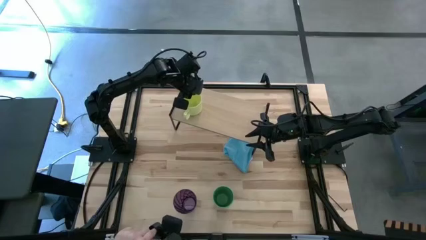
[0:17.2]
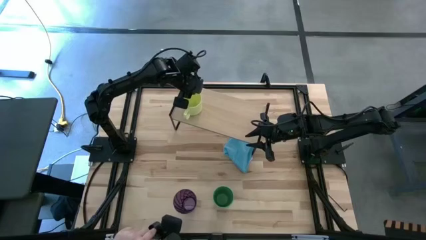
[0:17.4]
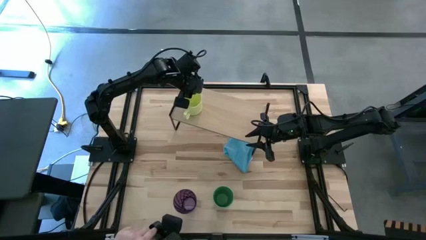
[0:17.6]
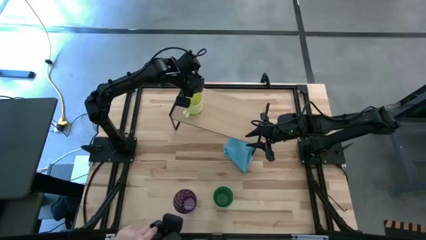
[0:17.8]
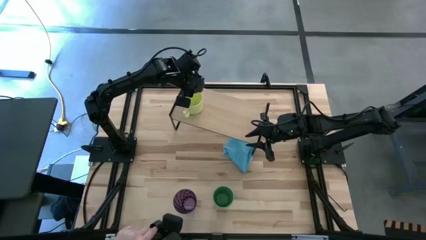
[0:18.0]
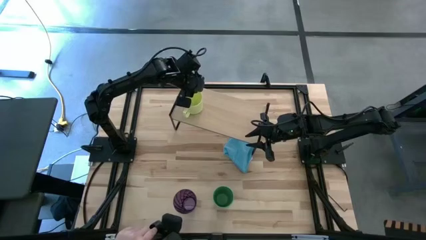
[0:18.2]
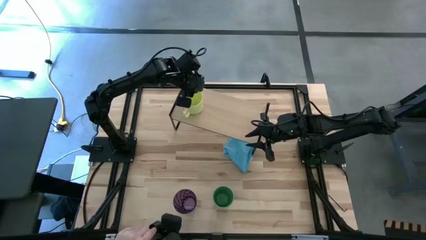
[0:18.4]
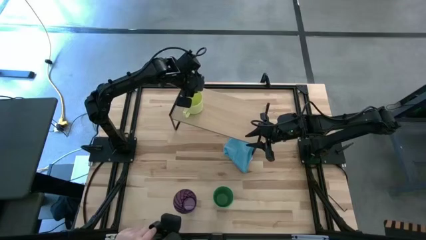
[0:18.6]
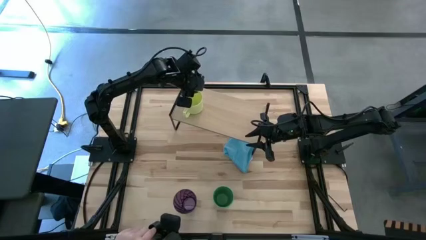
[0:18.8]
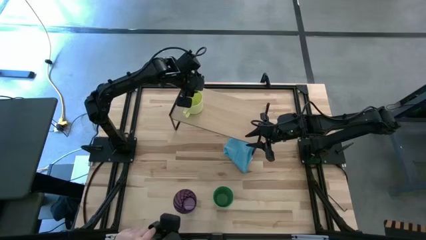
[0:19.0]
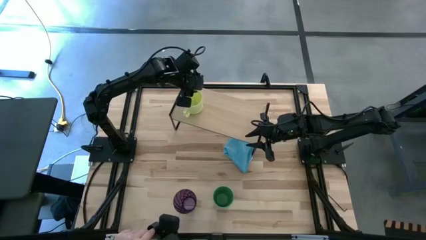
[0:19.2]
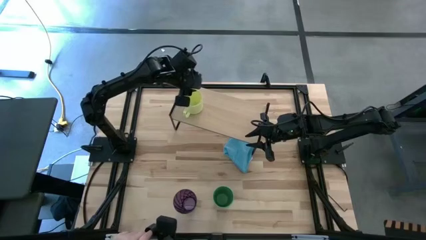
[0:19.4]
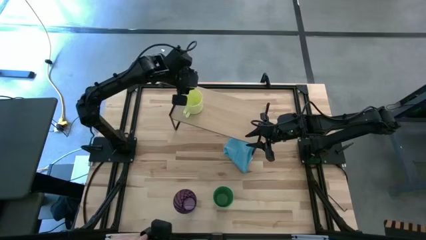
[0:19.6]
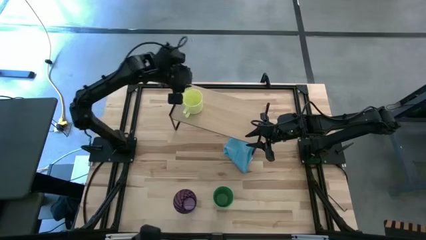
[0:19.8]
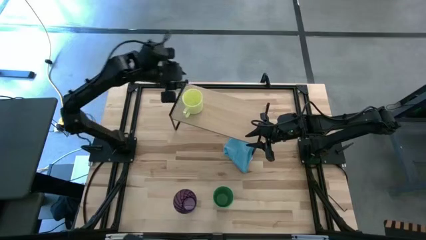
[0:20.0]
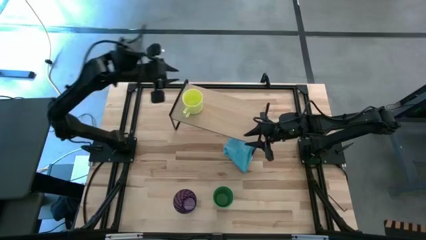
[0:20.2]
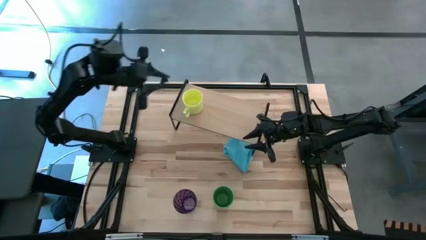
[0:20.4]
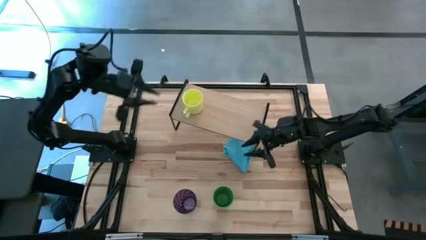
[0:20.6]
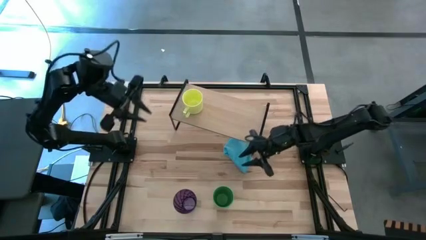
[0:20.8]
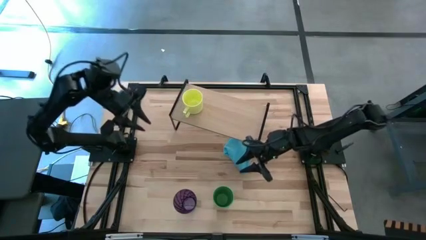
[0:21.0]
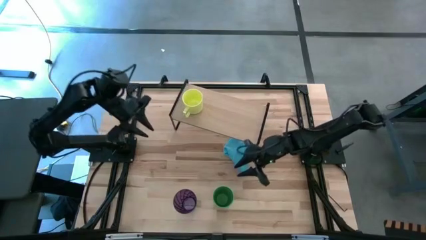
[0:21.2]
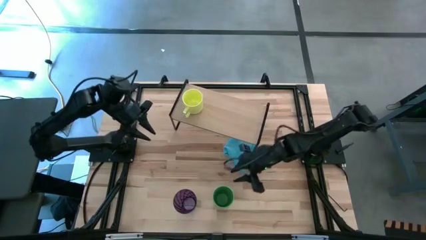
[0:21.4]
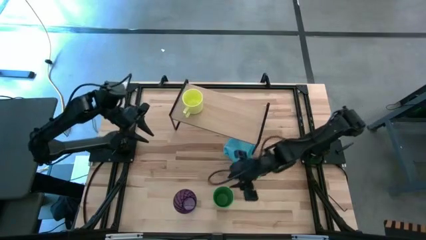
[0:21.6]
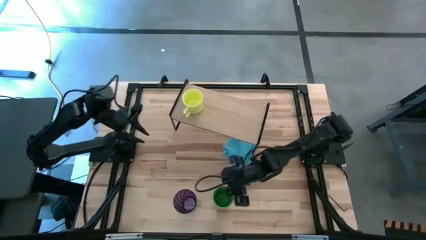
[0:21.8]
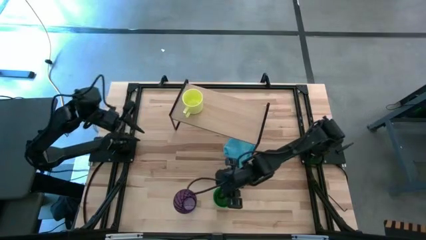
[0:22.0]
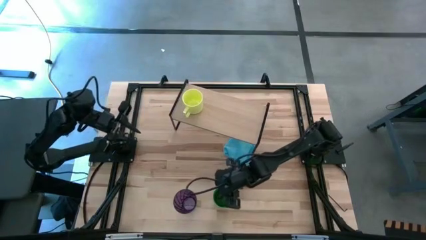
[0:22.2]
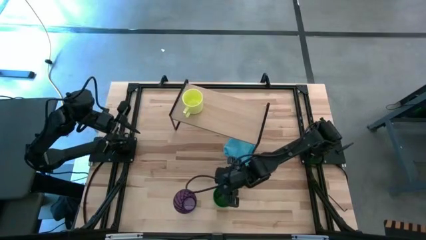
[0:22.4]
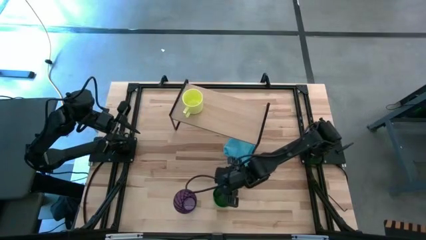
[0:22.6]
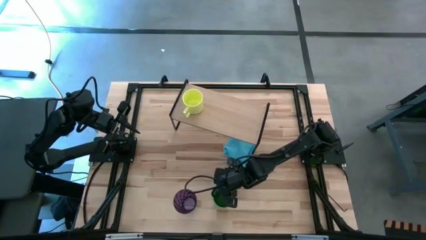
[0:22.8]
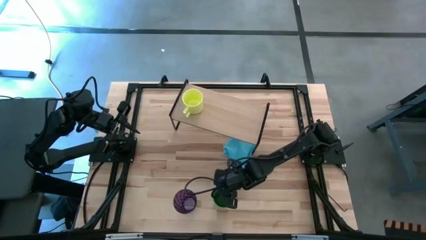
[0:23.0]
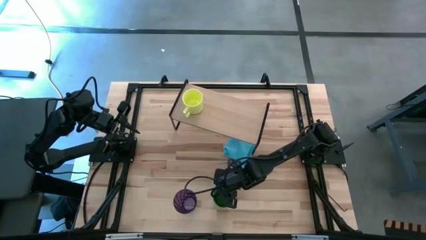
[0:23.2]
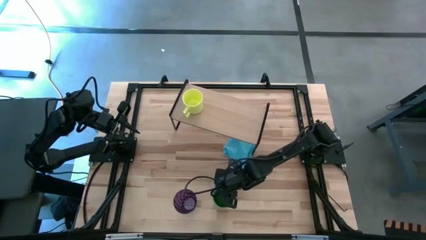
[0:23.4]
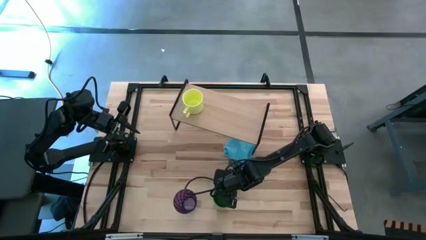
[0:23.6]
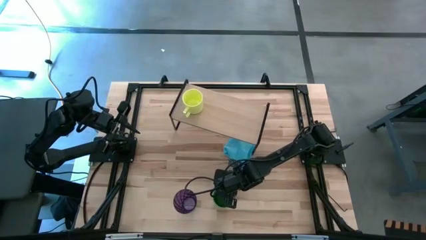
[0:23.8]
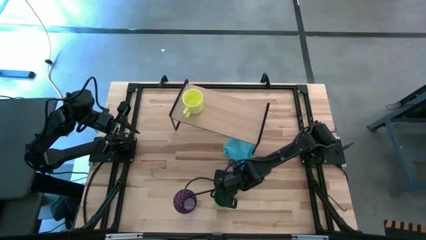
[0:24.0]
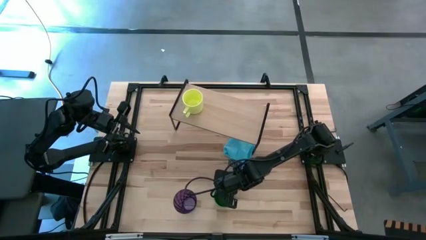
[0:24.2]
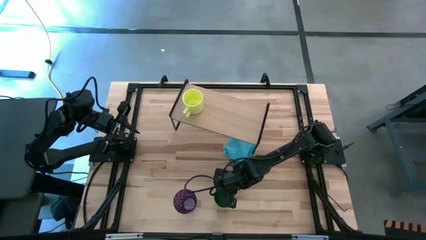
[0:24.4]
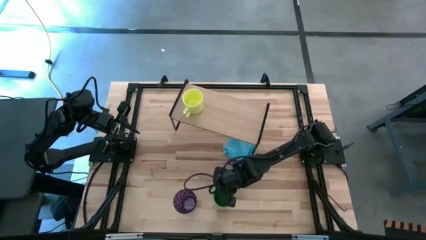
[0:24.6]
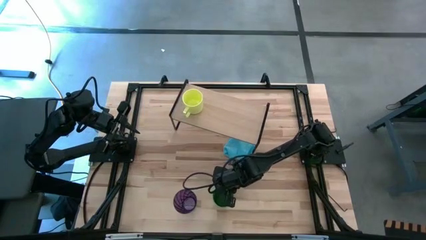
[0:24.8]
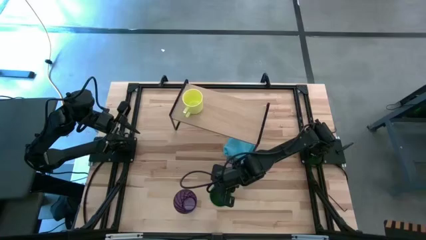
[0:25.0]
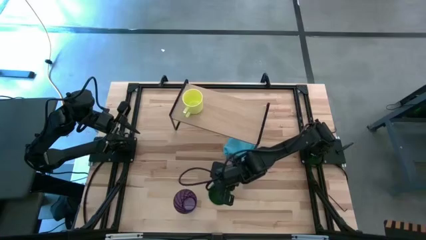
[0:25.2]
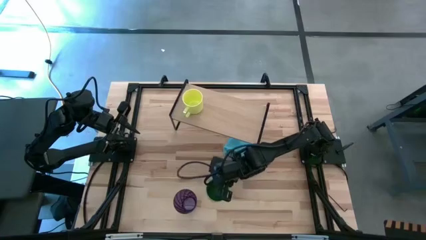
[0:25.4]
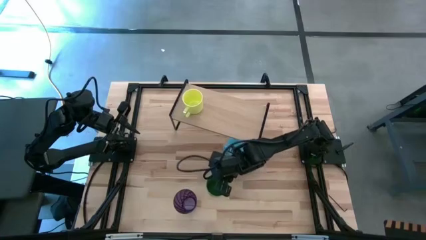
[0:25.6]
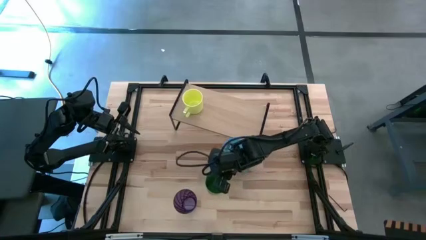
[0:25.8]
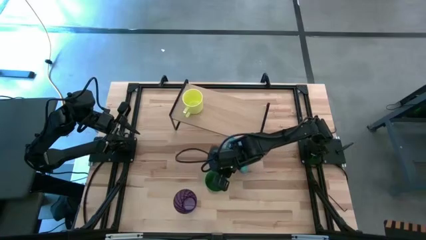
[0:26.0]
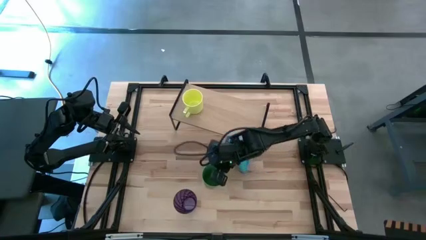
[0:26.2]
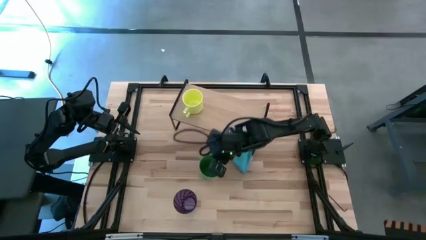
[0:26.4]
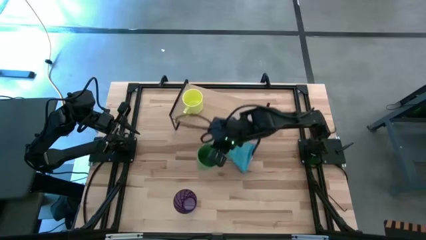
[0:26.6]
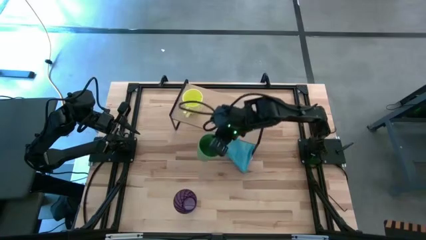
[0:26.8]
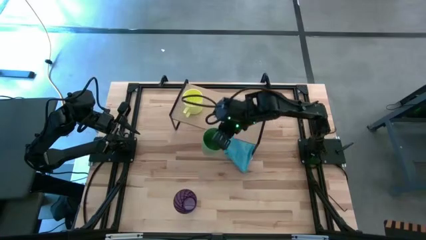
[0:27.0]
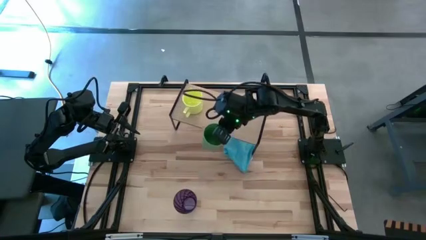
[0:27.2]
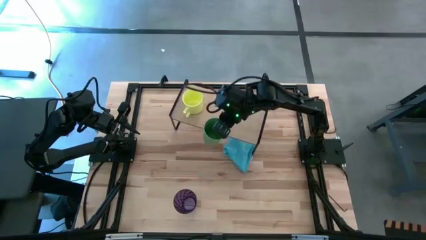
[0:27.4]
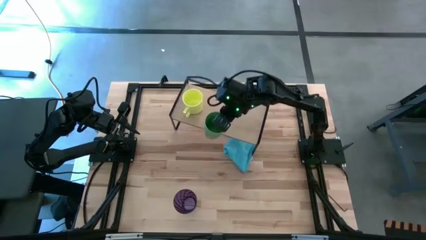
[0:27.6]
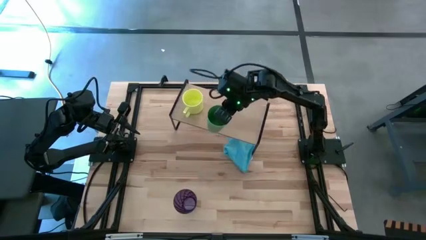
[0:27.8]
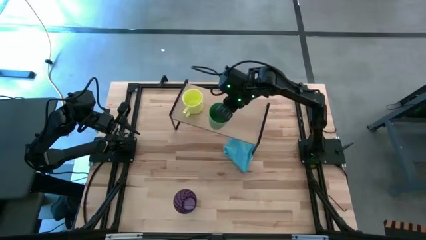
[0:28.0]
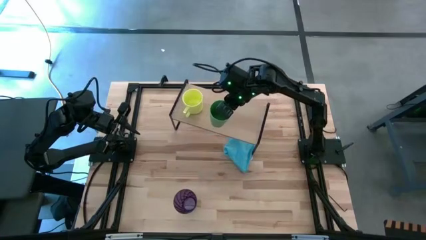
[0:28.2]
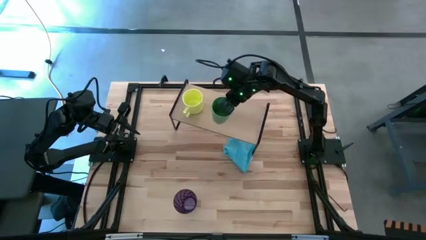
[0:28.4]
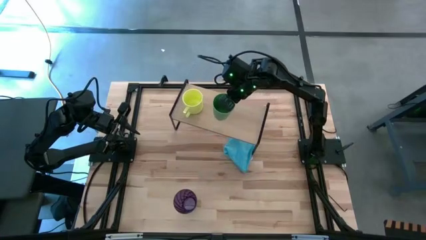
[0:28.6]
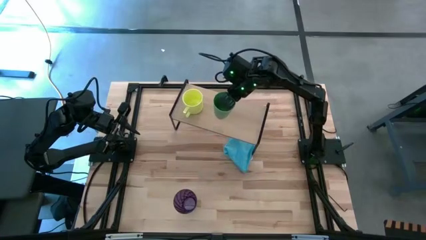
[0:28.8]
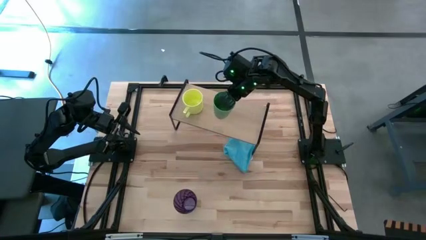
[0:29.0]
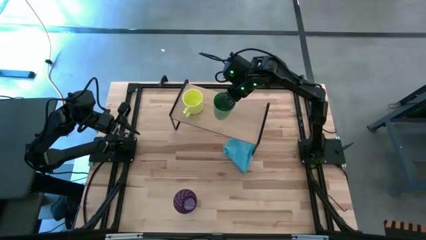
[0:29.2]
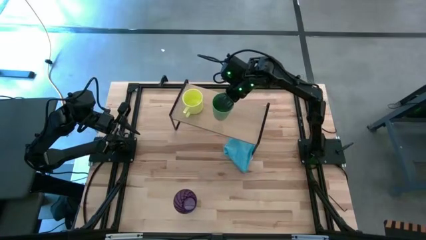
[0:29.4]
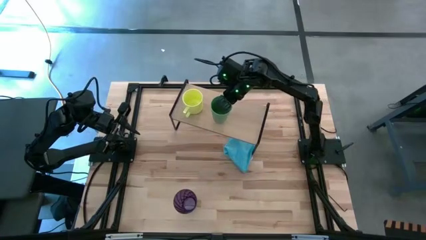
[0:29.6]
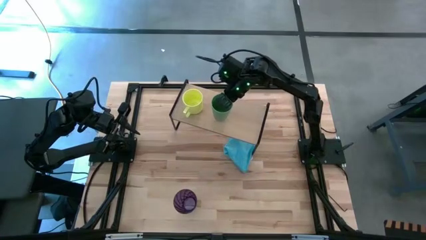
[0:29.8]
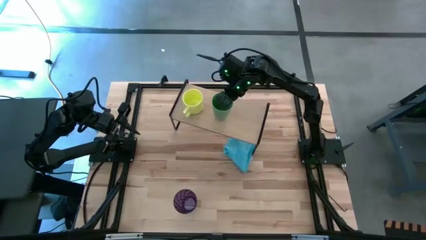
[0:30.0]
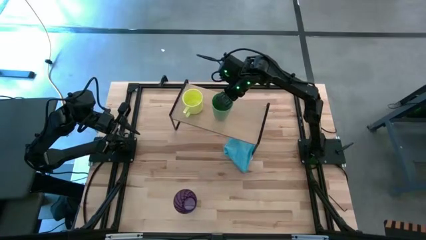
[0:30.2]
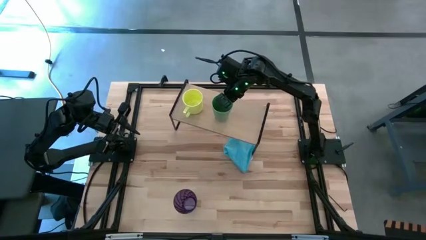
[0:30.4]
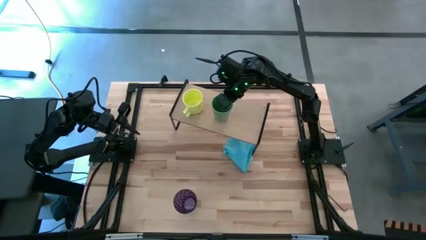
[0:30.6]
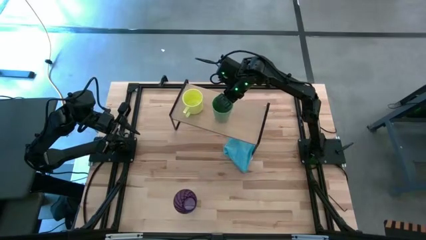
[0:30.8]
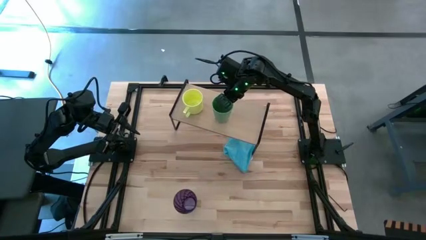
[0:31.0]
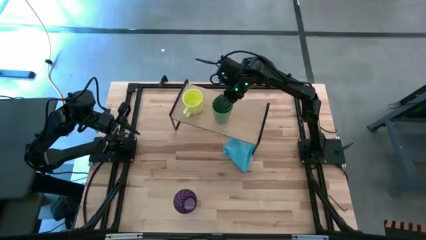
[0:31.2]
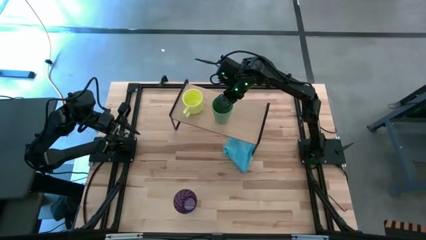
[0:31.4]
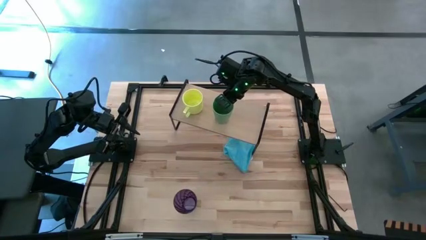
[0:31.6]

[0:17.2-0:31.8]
Task: Stack small to large cups/mugs on shelf
Put the green cup on the shelf
